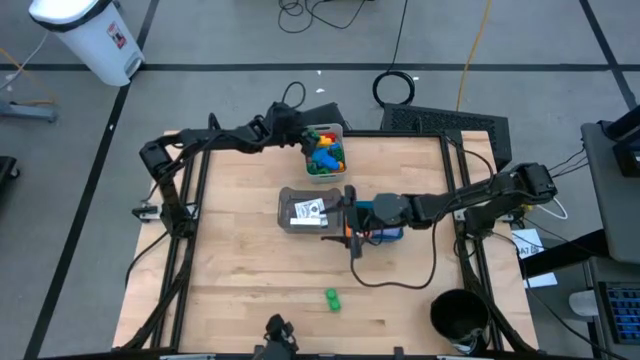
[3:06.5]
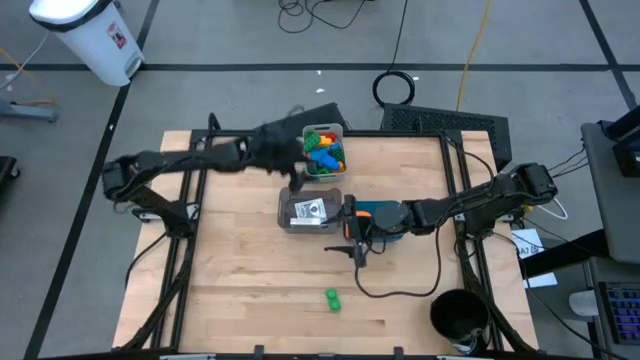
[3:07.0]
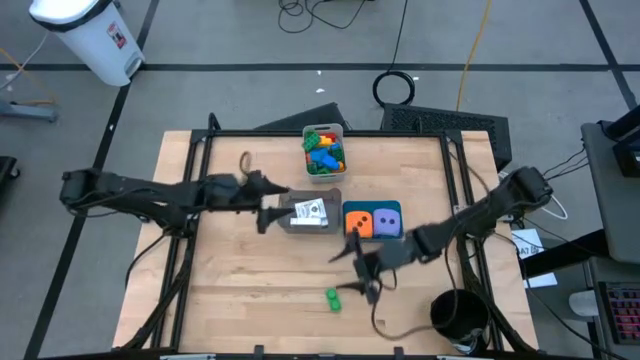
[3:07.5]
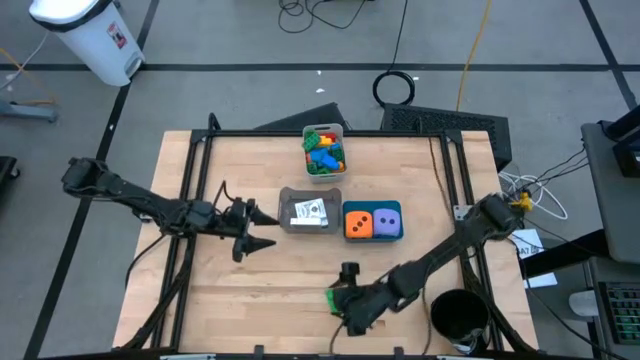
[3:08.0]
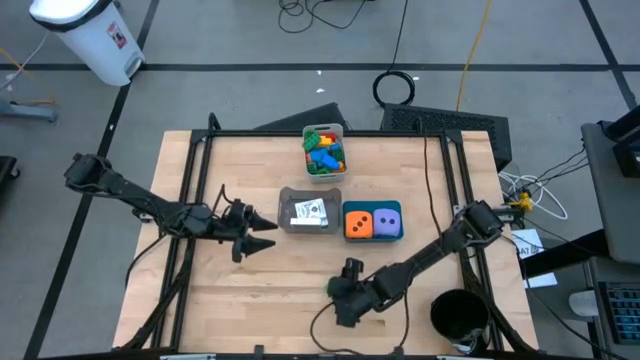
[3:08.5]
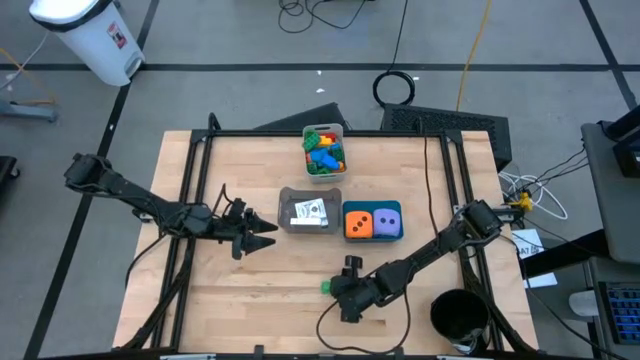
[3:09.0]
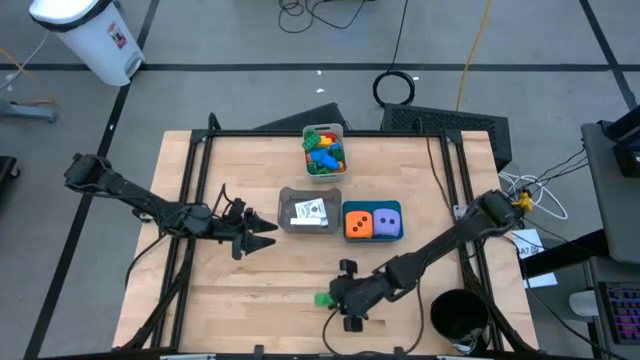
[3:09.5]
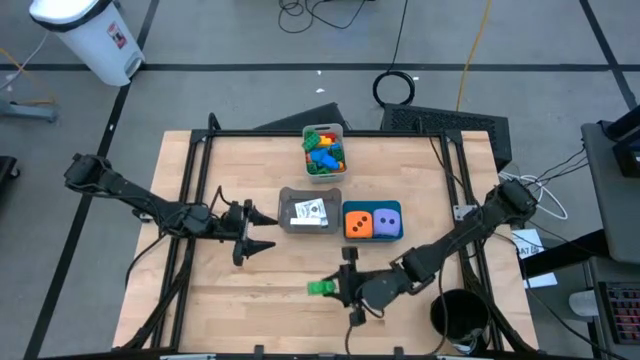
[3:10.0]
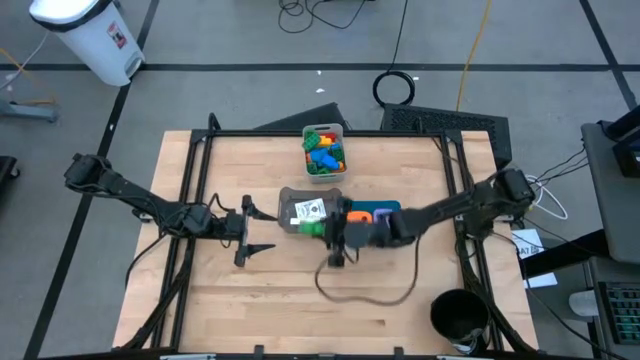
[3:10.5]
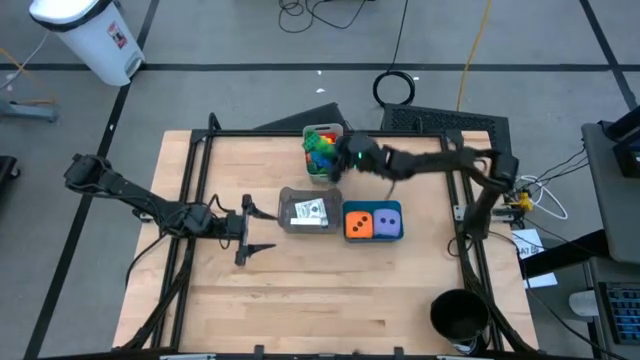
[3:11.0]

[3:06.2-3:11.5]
Task: Pick & Place Toys
Put the green game piece into the gray bin

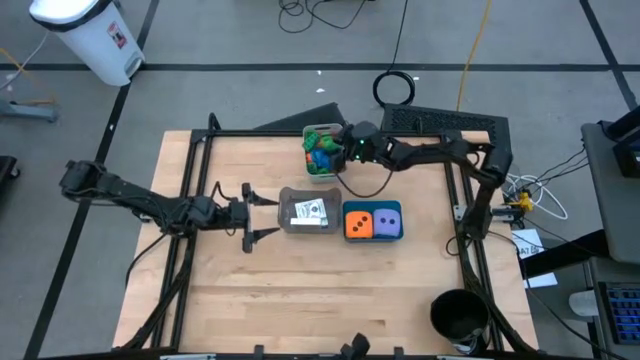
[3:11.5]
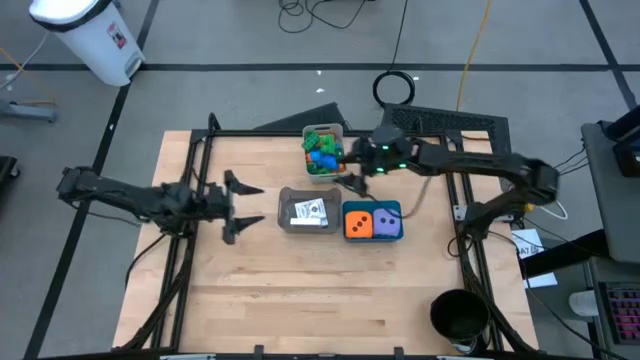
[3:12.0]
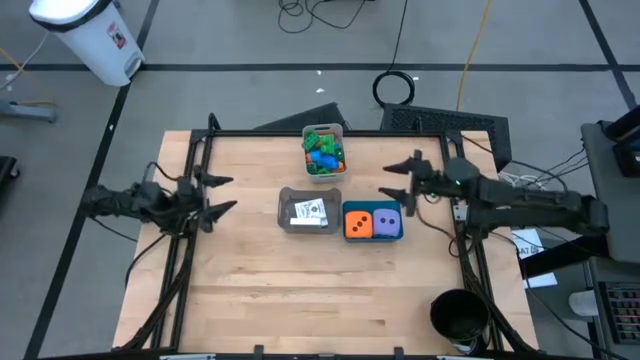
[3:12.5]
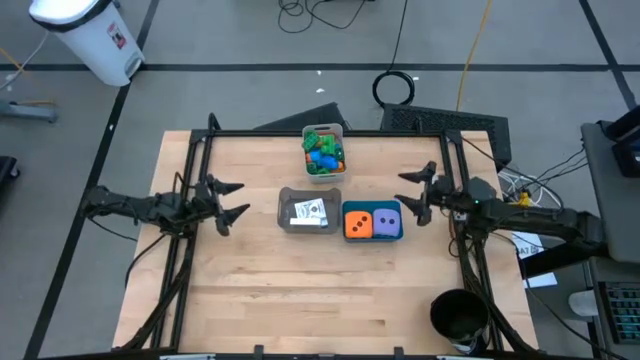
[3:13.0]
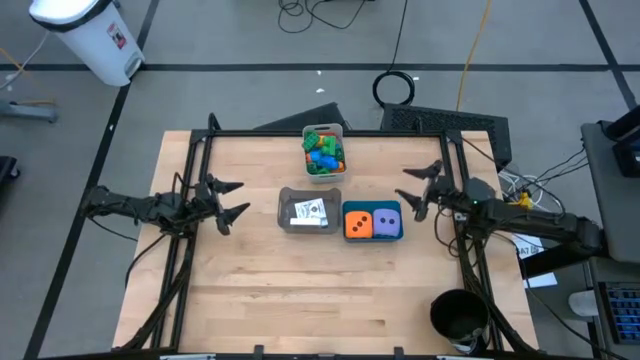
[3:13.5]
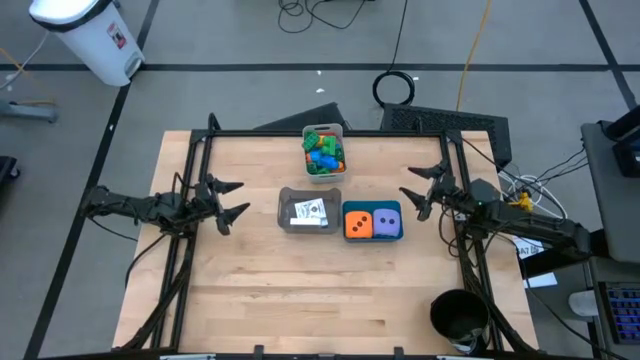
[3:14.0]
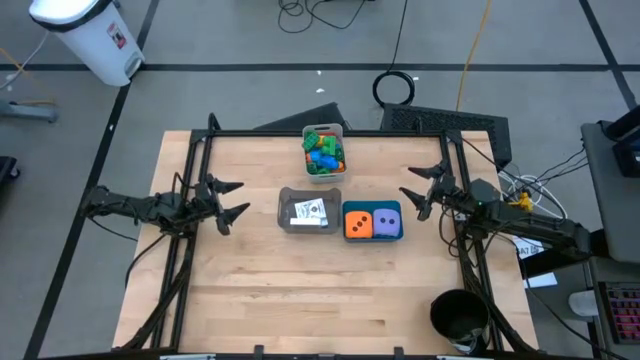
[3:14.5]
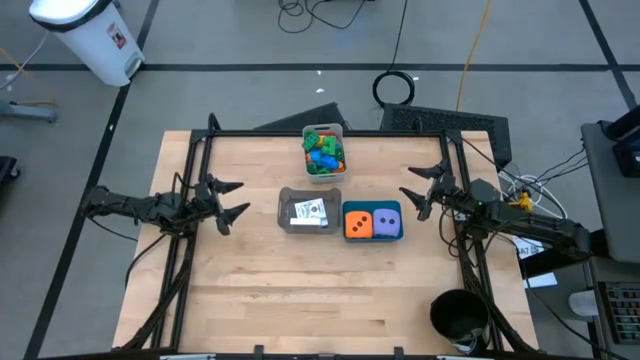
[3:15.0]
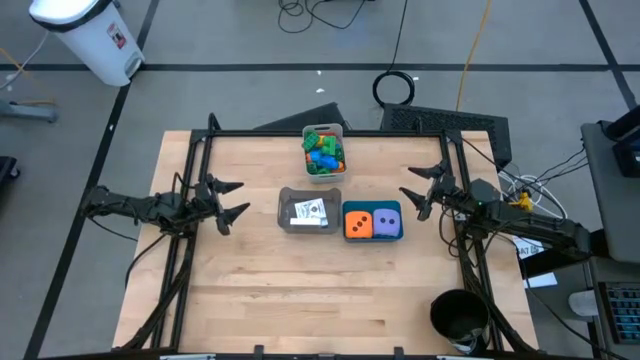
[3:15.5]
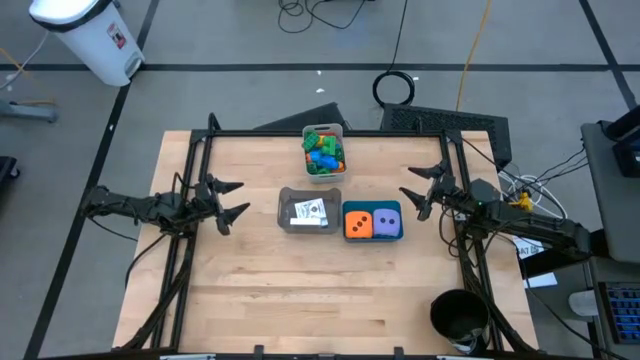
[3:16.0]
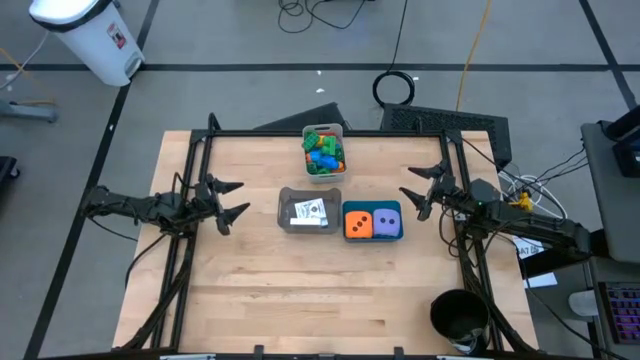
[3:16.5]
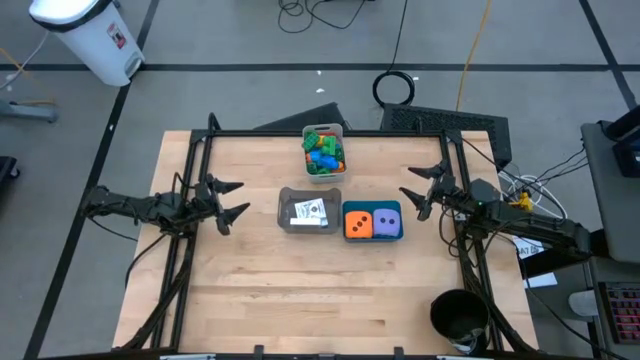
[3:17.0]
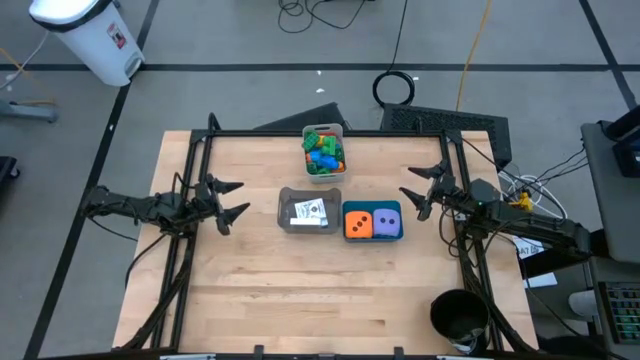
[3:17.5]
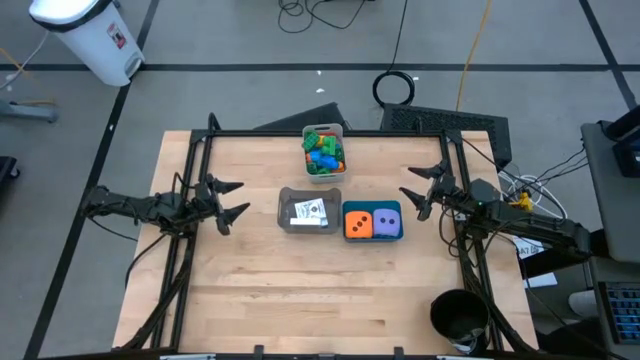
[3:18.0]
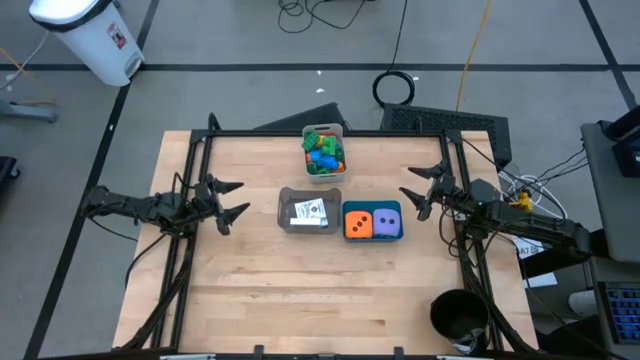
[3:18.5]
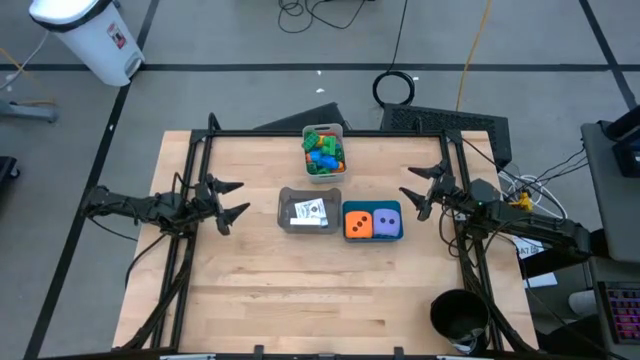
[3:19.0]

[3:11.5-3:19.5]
Return to Home Position

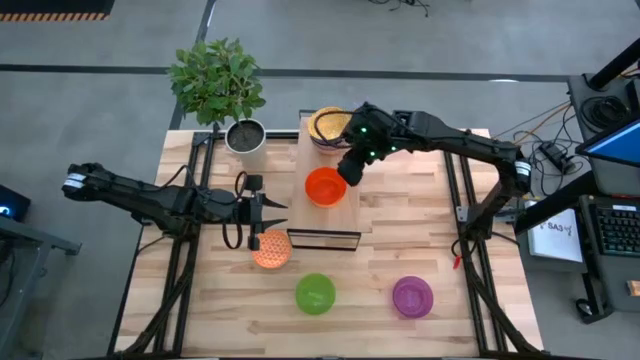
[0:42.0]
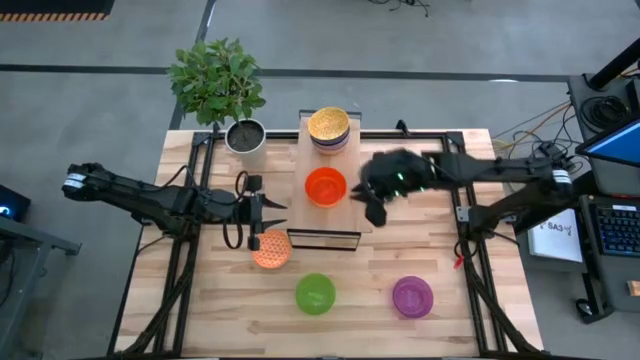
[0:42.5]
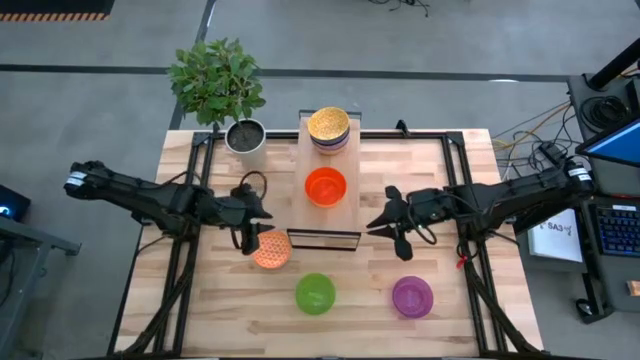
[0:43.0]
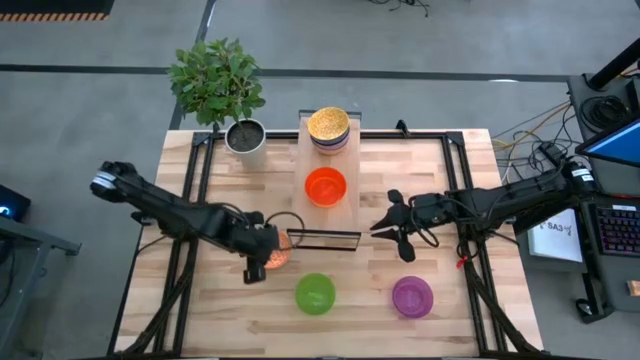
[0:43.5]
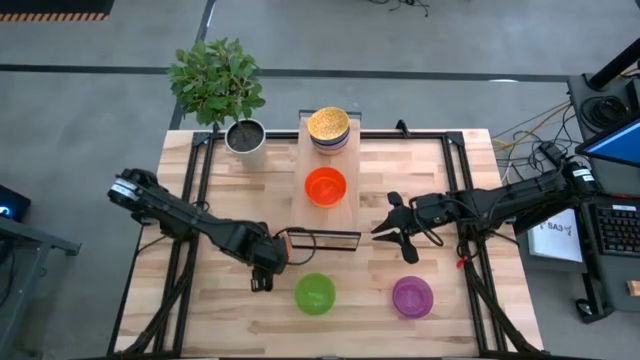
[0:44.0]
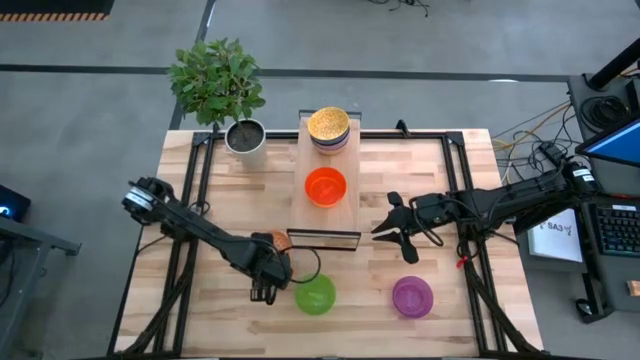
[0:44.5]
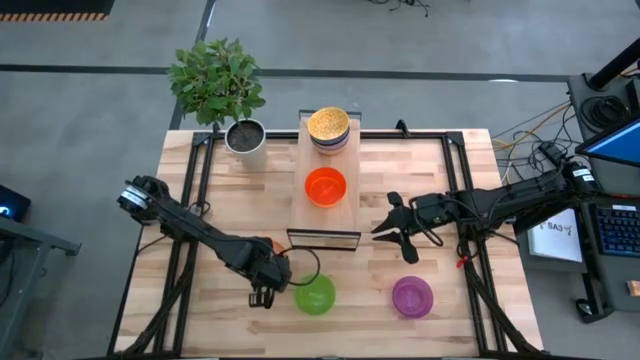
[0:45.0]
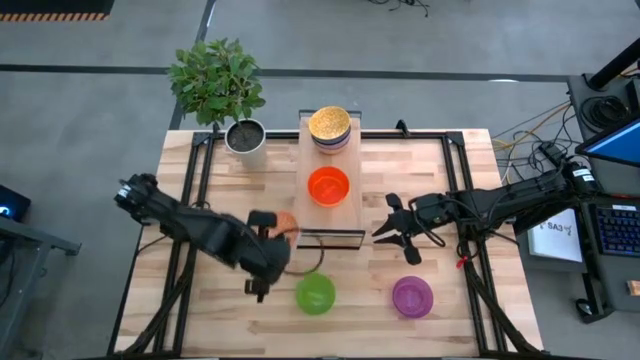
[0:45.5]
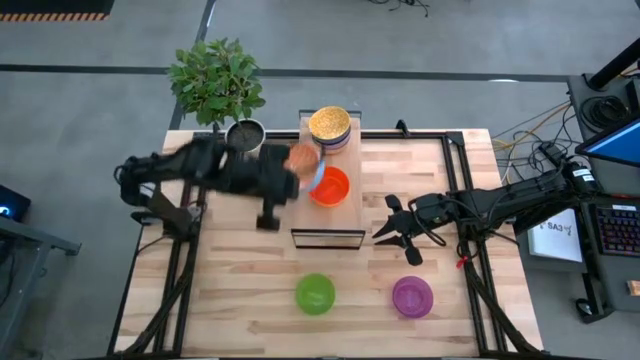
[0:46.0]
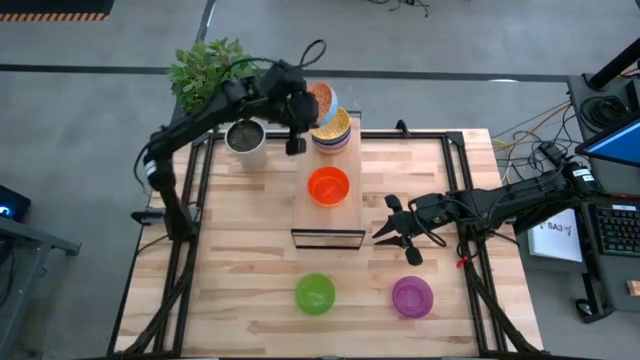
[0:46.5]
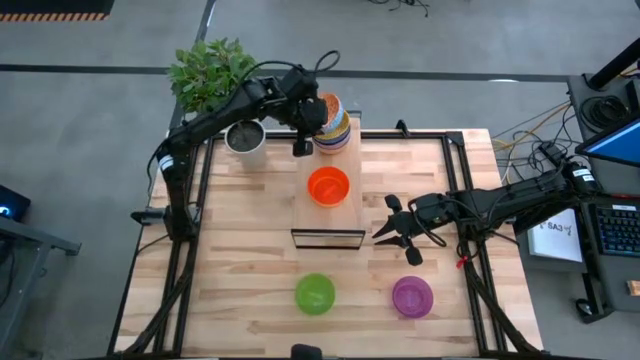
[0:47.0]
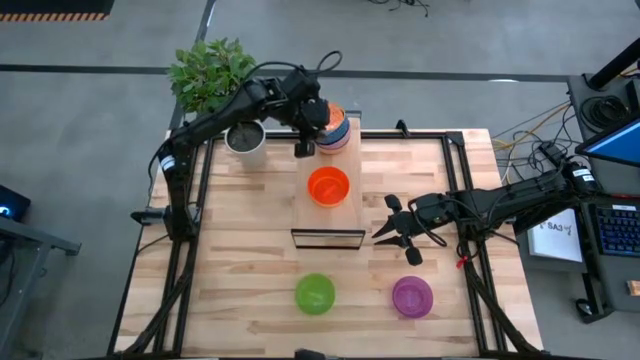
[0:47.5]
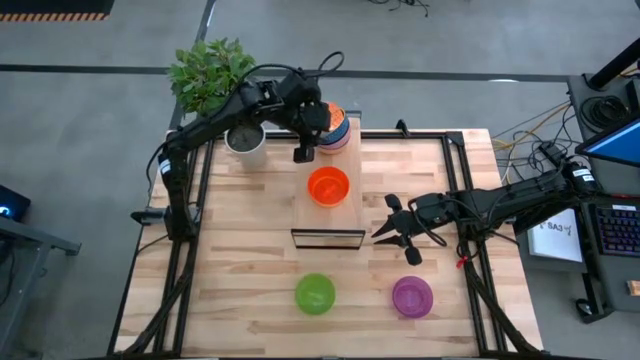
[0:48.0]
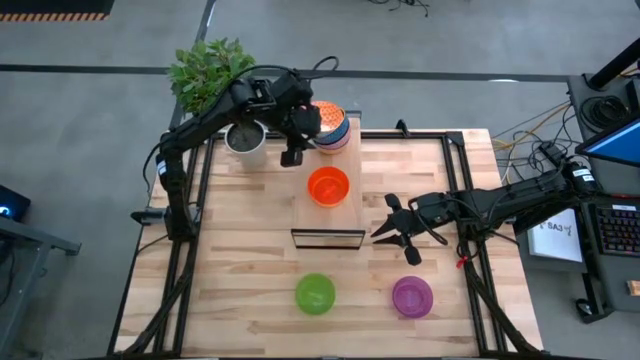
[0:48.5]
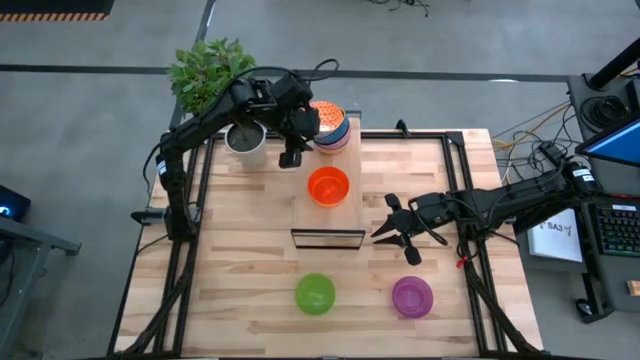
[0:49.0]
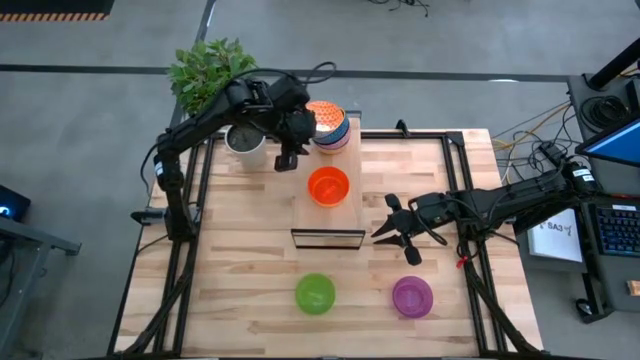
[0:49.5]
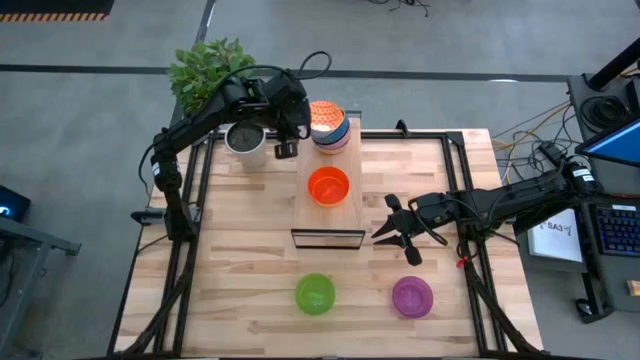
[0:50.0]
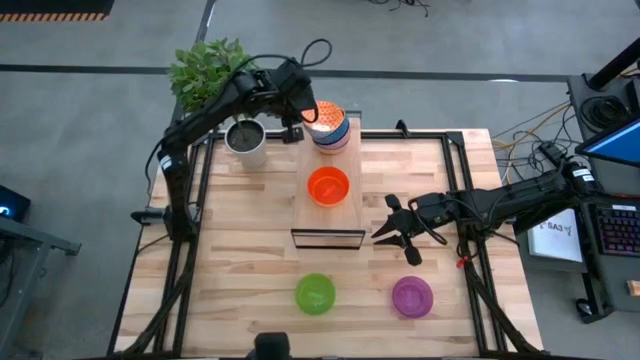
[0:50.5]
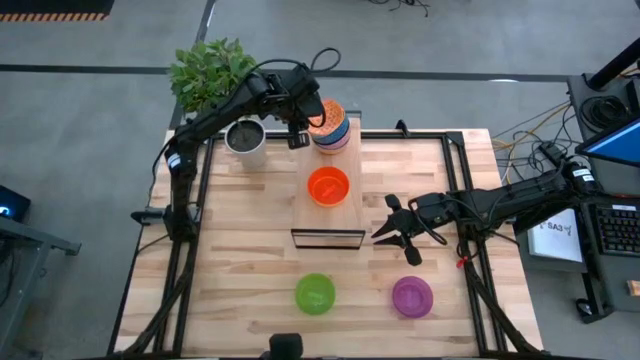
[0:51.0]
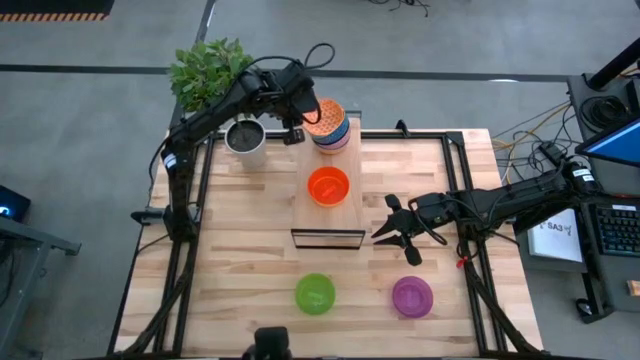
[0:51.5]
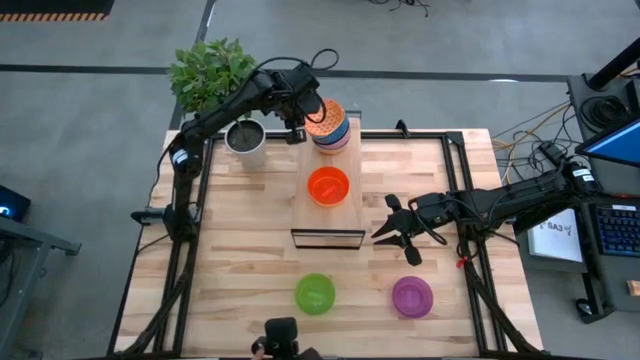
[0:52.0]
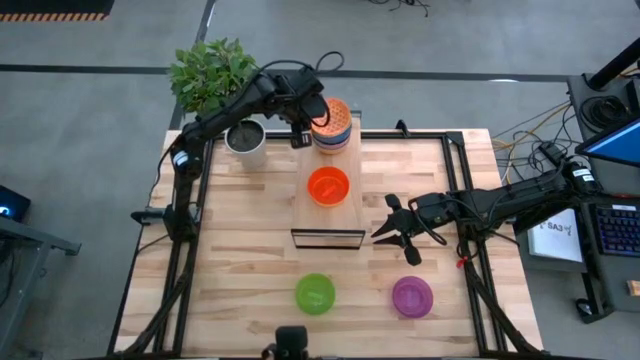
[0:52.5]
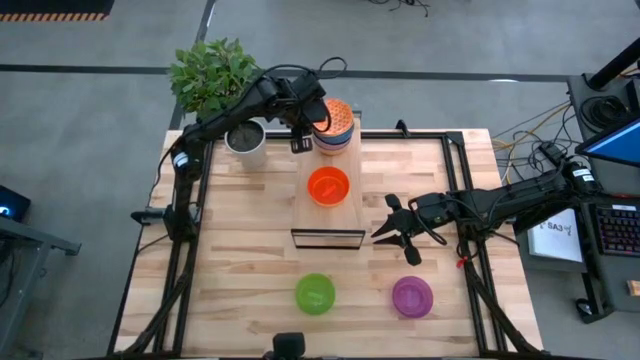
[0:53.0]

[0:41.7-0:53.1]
Task: Place and stack bowls onto a shelf
Stack the orange patterned bowl on top of the yellow patterned bowl on the shelf
